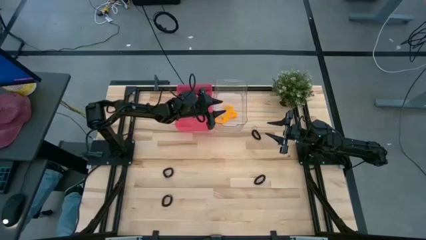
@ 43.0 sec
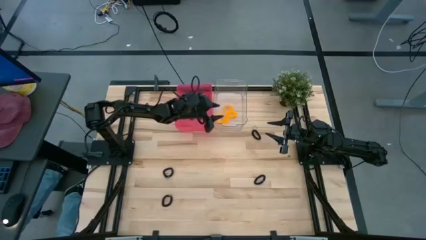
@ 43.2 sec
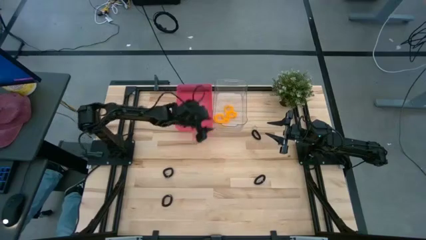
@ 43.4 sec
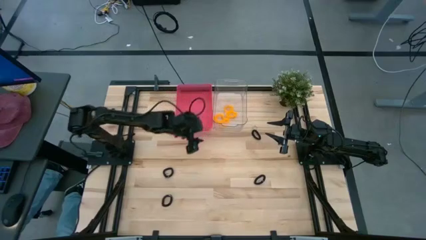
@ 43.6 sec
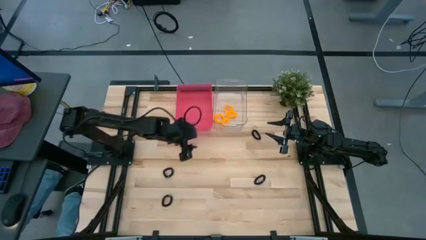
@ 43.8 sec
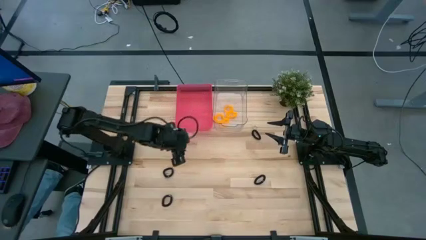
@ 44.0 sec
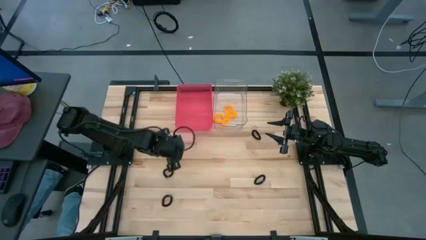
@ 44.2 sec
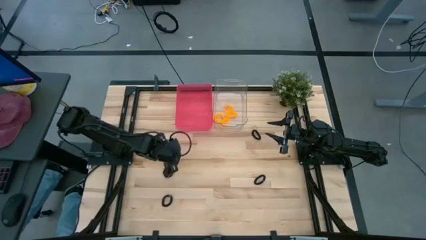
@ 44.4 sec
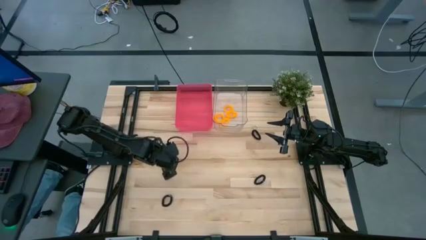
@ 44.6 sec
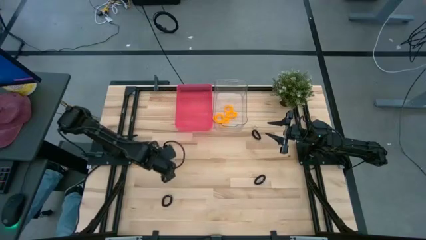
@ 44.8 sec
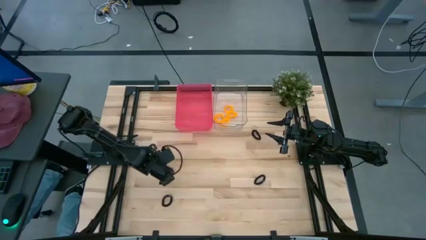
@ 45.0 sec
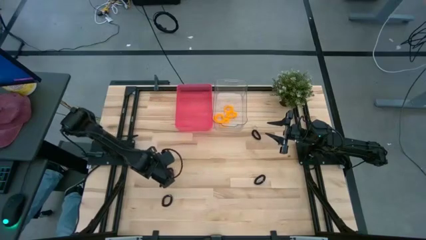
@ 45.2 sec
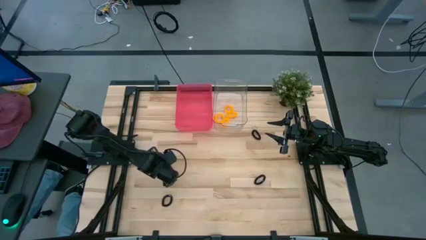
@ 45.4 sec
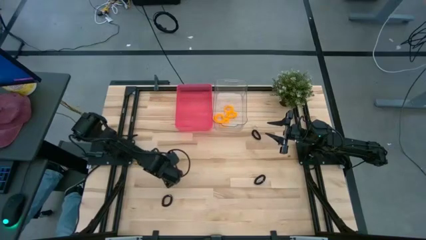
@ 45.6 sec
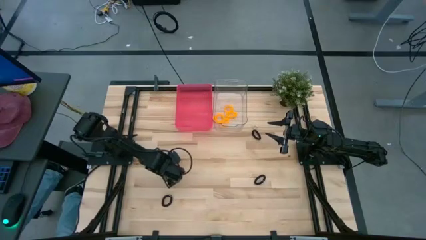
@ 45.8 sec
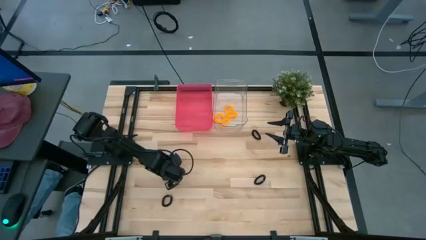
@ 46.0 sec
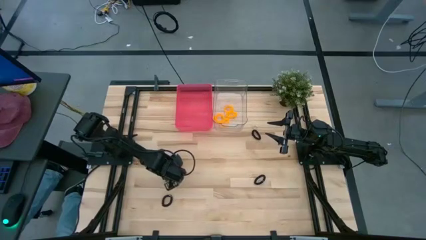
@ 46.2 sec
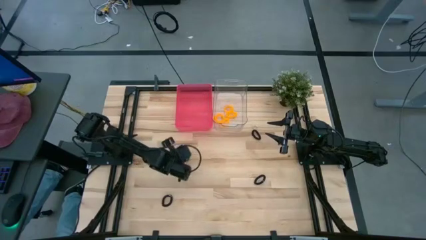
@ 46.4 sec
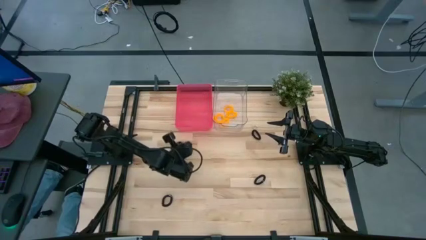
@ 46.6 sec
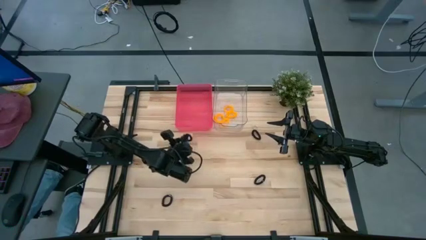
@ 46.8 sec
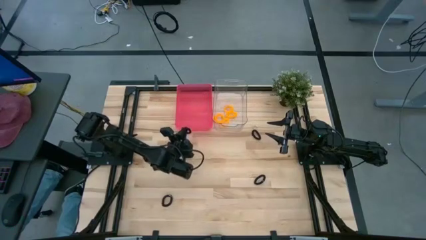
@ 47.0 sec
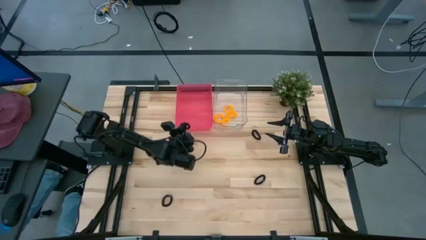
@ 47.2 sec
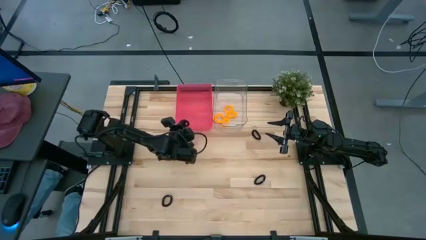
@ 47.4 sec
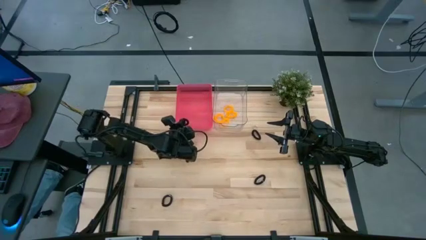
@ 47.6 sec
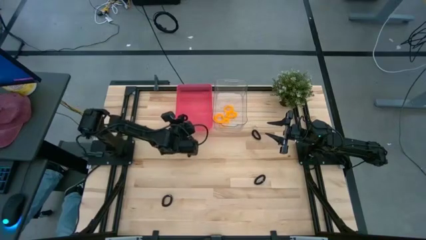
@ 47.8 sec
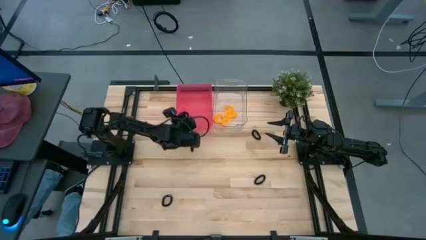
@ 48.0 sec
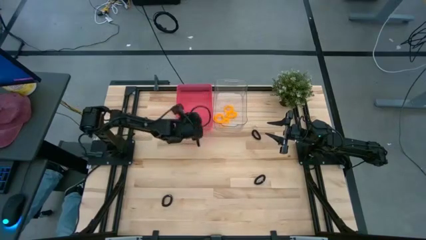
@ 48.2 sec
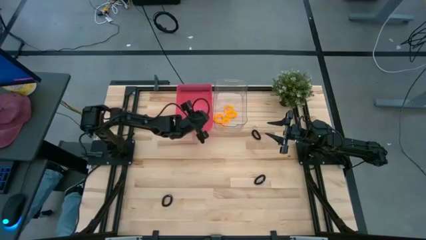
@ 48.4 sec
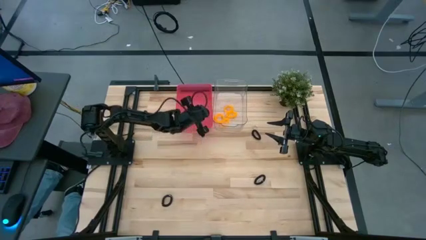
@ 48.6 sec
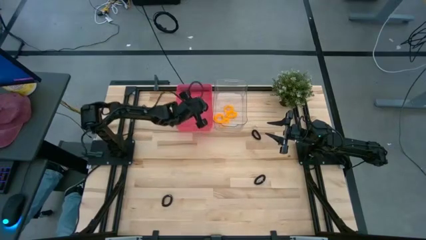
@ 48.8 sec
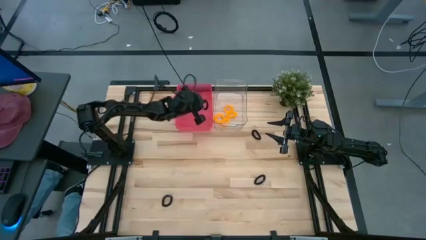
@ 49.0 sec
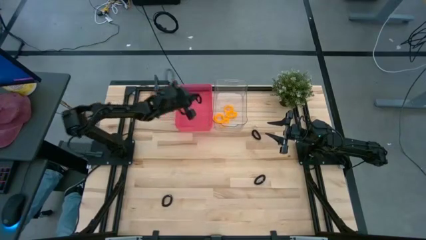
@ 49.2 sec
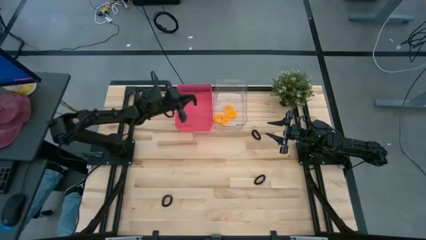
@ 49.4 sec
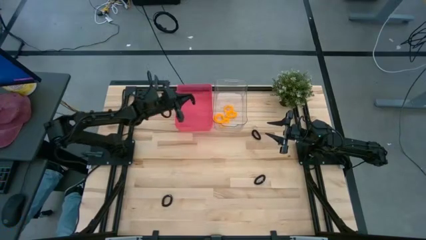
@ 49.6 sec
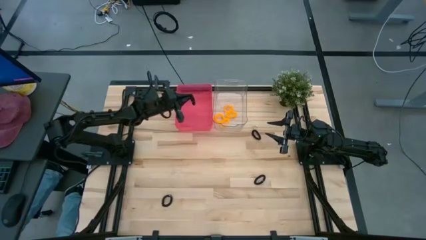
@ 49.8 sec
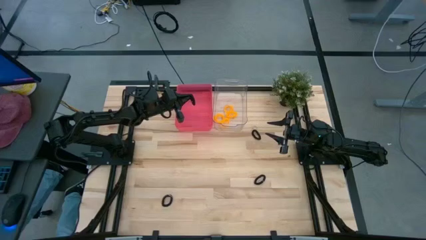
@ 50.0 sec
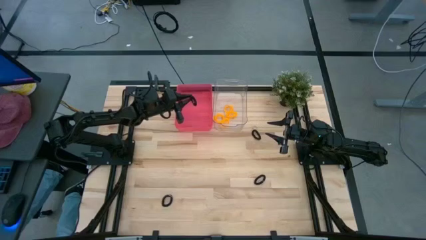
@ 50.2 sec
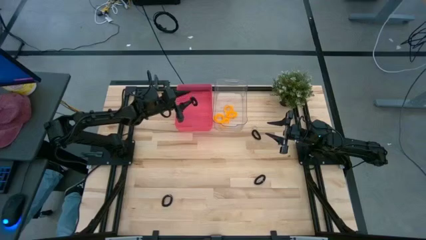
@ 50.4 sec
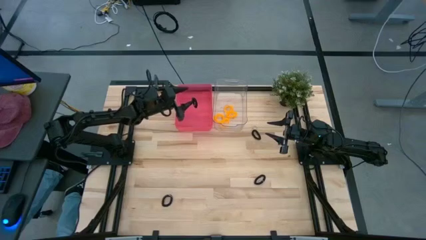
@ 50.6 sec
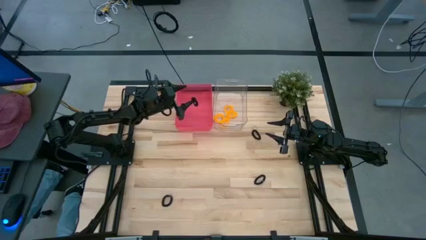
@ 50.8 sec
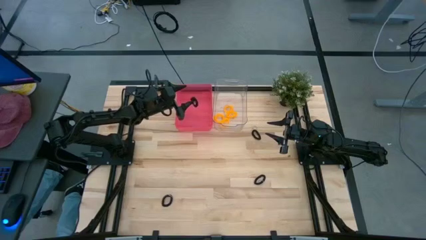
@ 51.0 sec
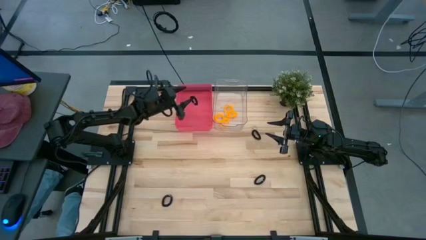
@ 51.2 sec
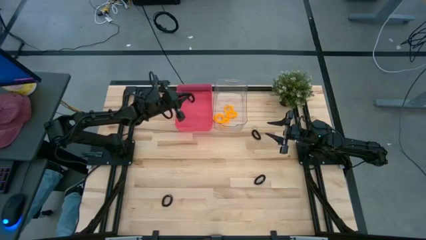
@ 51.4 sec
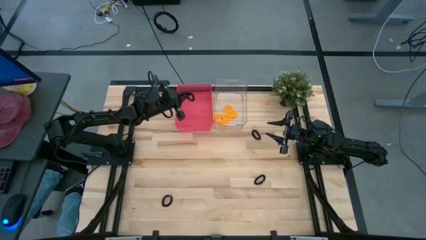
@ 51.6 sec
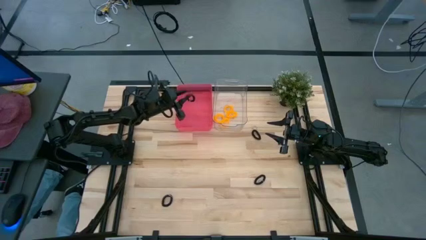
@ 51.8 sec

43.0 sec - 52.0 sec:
Task: Sort spring keychains
Put the black spring keychain into the red bin

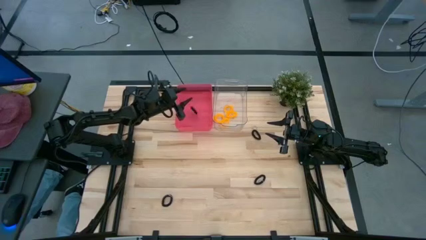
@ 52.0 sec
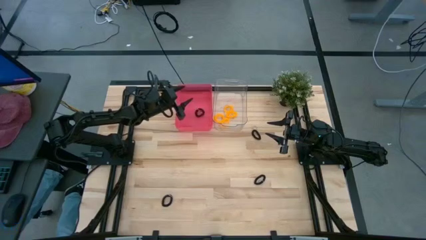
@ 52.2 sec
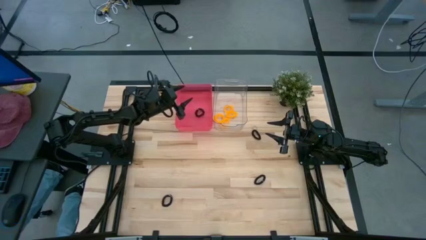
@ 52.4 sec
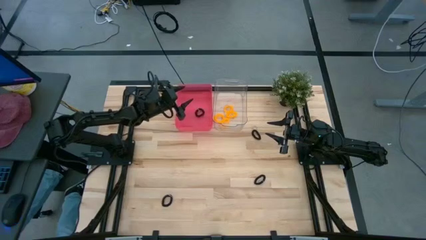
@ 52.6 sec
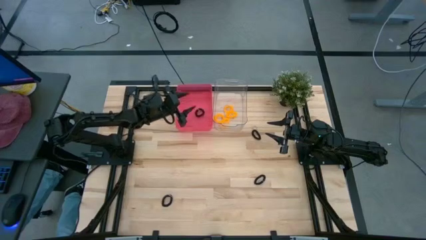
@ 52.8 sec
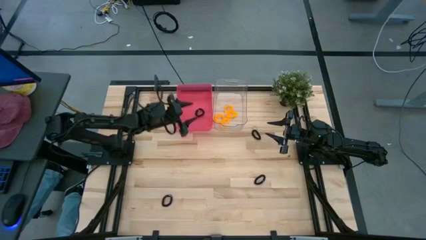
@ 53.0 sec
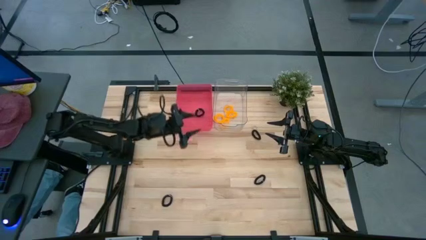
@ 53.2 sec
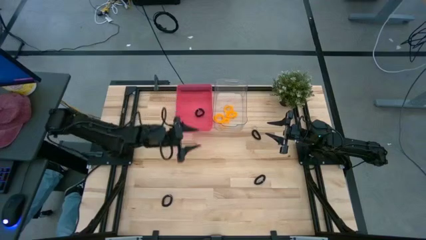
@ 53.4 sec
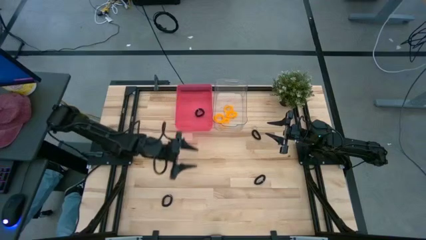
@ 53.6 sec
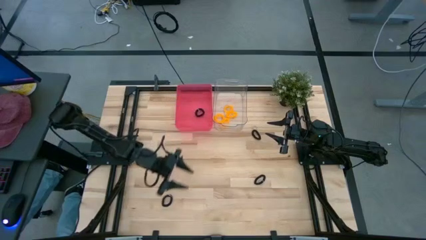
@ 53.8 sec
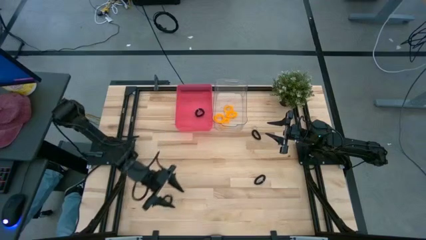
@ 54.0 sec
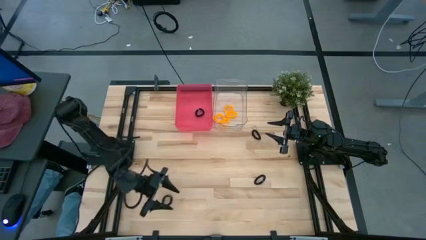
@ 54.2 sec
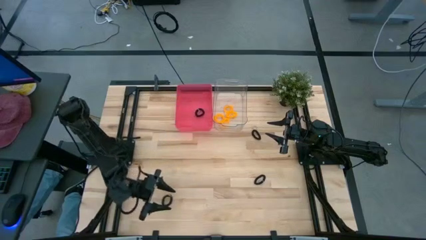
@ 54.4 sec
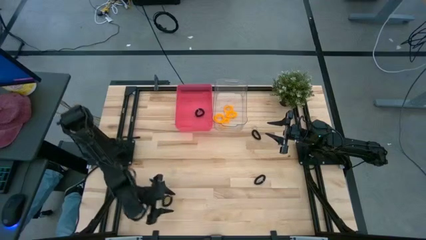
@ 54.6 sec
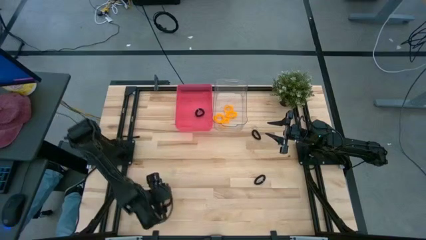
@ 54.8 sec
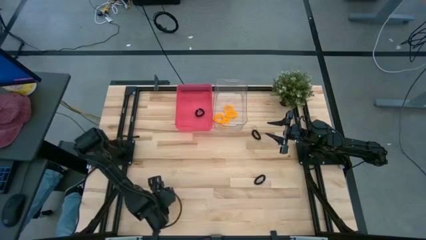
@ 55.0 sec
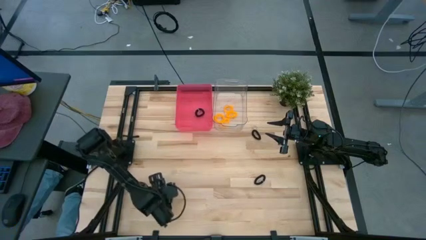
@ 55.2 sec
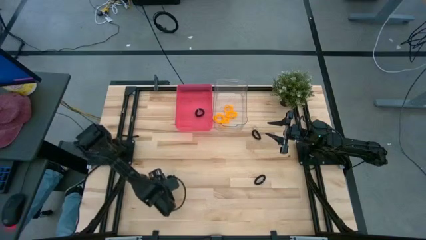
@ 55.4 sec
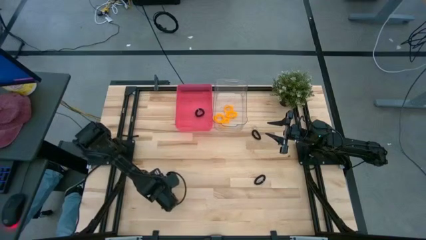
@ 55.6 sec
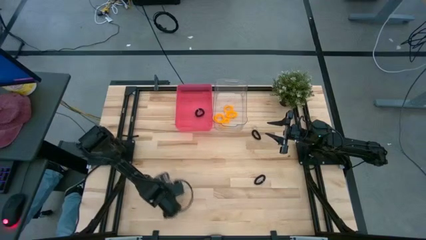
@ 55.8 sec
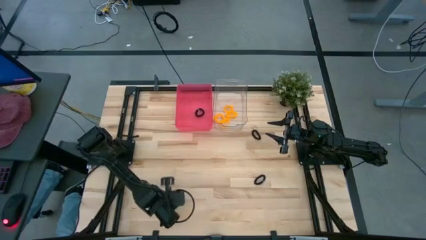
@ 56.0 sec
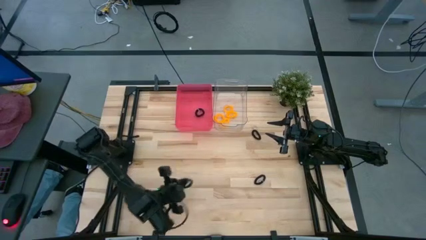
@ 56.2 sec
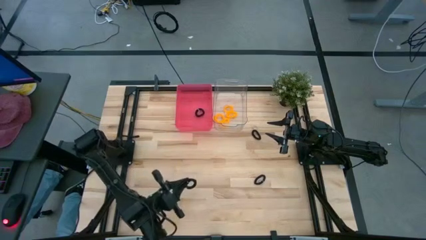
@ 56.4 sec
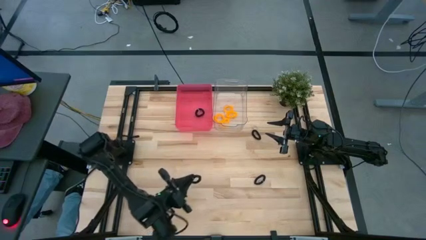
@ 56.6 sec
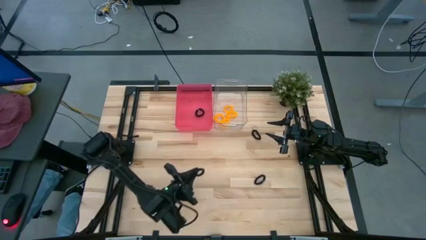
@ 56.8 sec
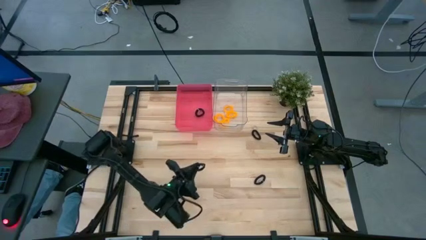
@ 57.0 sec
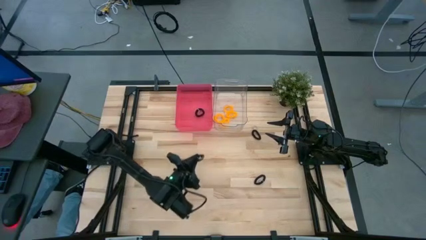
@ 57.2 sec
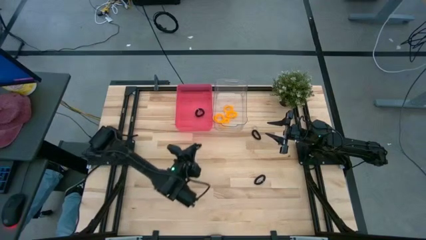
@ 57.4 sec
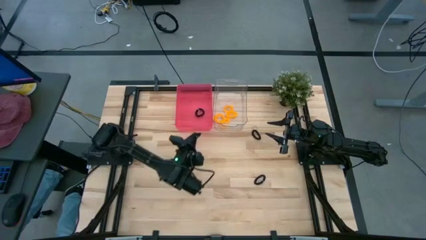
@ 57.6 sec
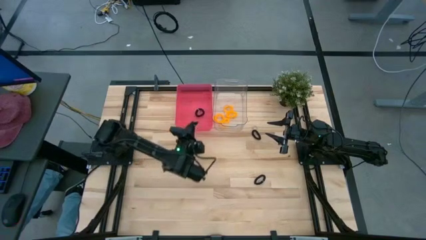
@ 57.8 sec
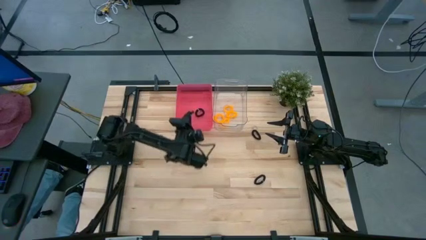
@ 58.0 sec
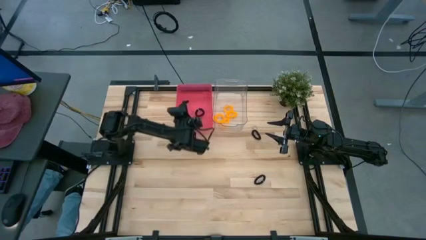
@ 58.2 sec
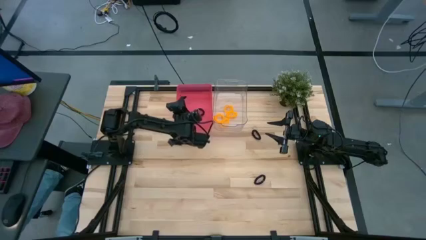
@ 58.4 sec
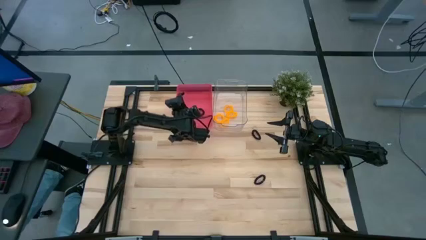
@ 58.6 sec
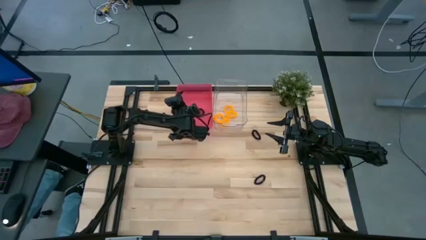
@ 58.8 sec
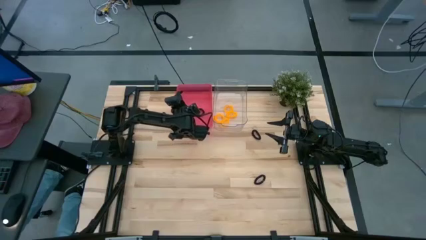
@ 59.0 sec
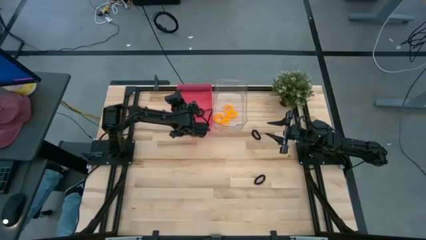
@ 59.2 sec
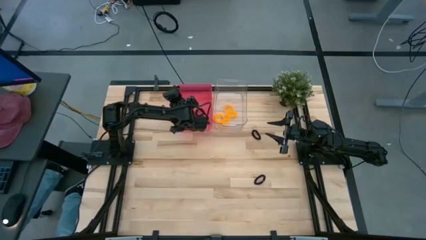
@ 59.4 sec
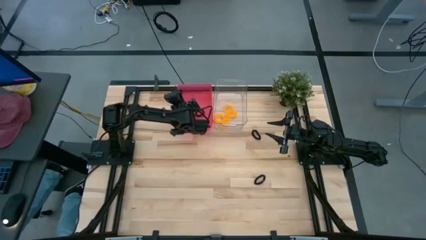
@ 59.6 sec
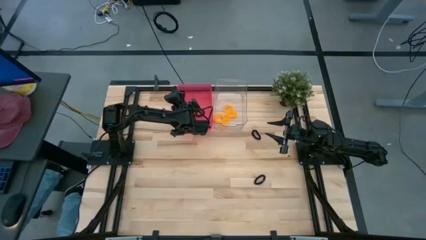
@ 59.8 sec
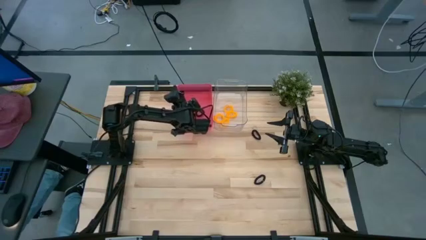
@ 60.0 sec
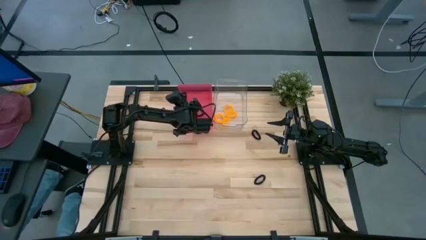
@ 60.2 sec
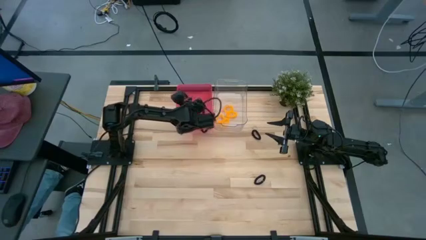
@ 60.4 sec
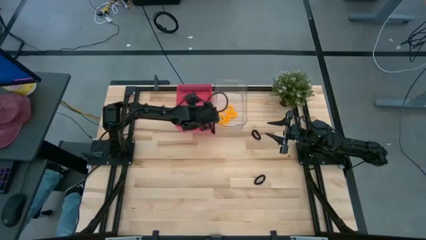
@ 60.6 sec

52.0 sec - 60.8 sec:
Put the black spring keychain into the red bin
